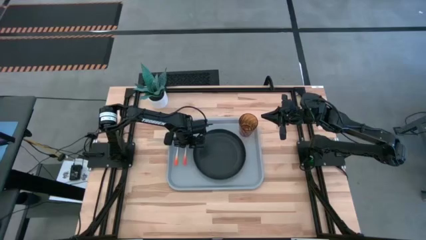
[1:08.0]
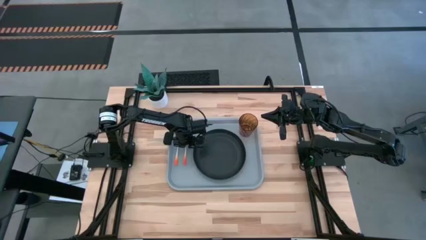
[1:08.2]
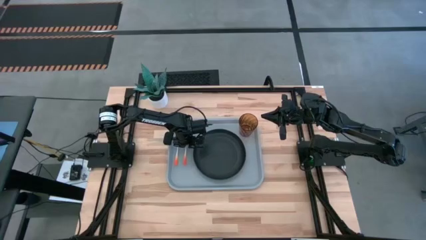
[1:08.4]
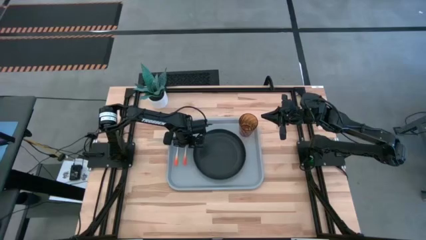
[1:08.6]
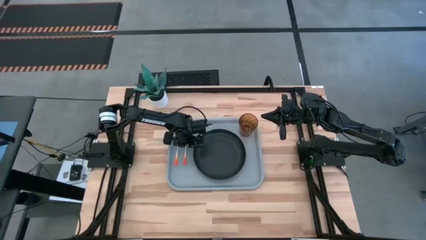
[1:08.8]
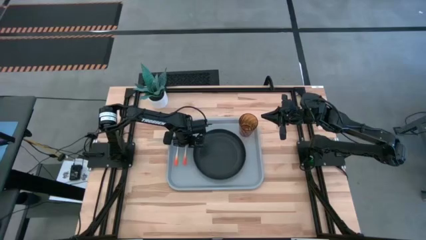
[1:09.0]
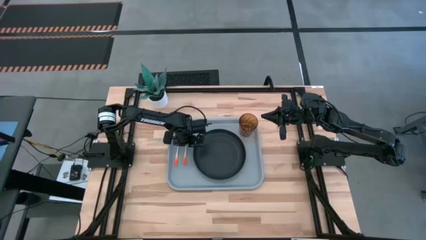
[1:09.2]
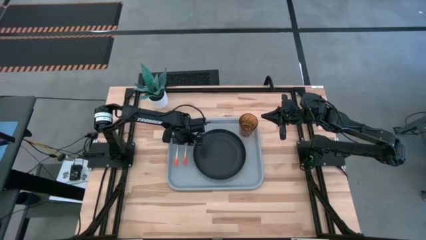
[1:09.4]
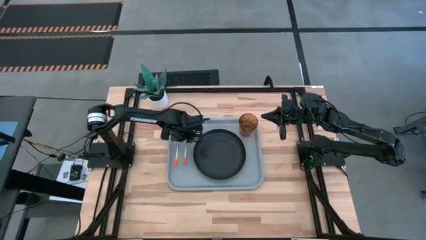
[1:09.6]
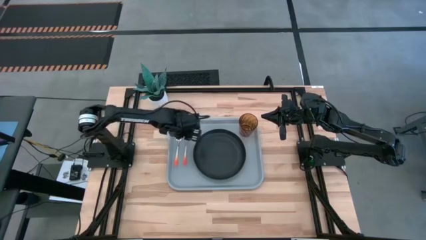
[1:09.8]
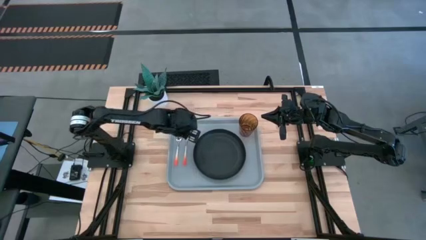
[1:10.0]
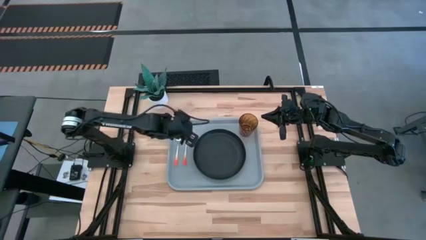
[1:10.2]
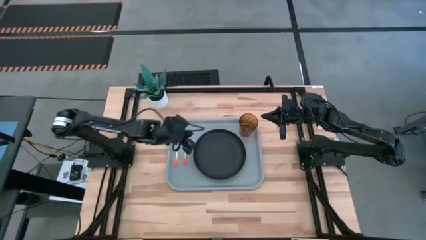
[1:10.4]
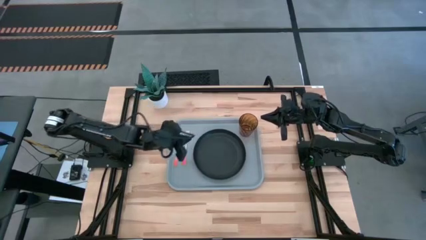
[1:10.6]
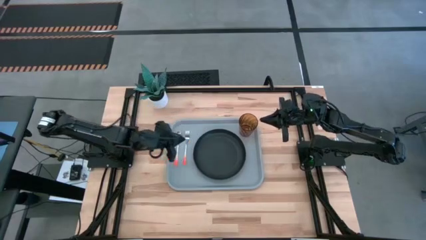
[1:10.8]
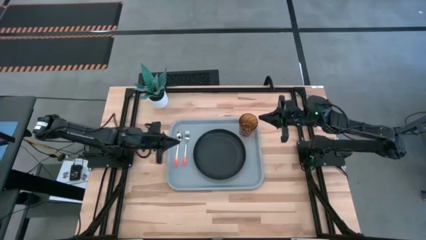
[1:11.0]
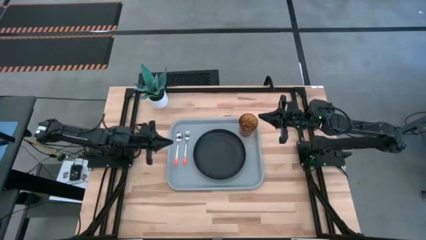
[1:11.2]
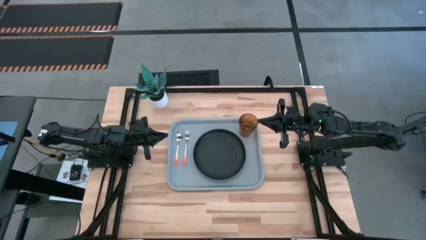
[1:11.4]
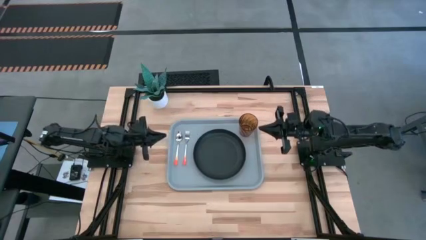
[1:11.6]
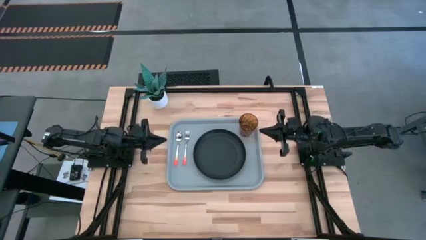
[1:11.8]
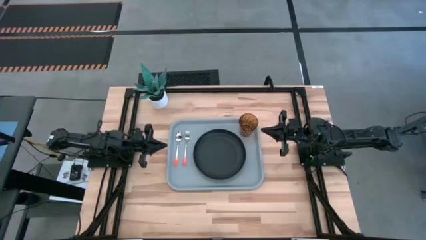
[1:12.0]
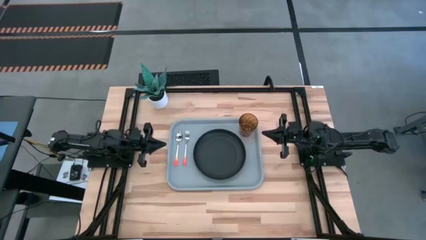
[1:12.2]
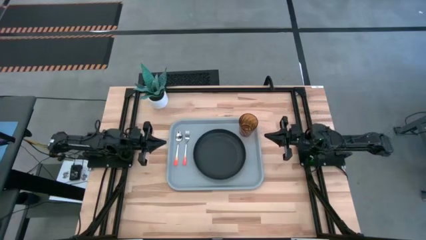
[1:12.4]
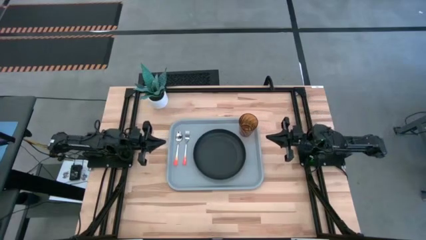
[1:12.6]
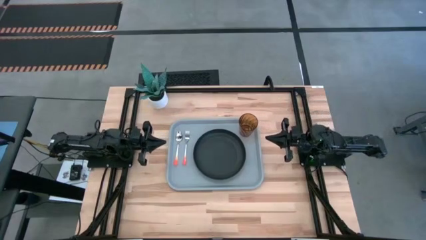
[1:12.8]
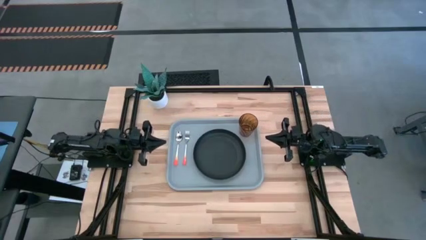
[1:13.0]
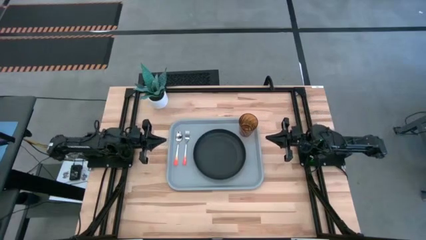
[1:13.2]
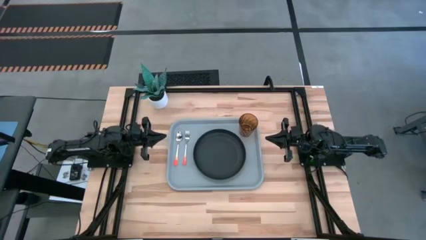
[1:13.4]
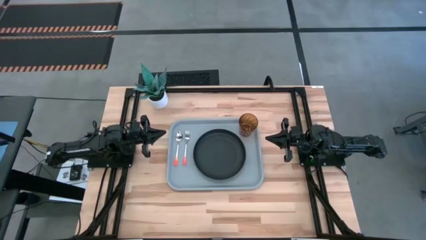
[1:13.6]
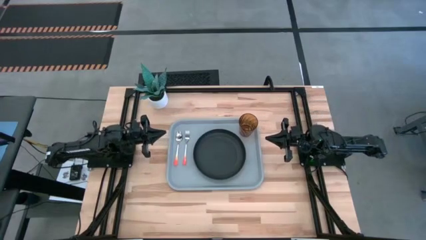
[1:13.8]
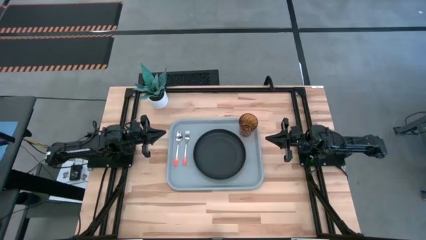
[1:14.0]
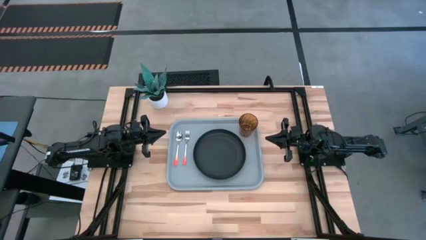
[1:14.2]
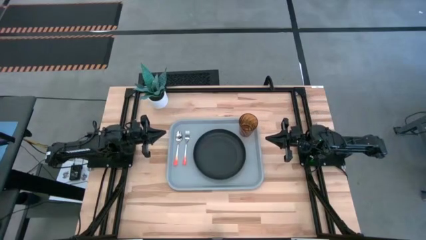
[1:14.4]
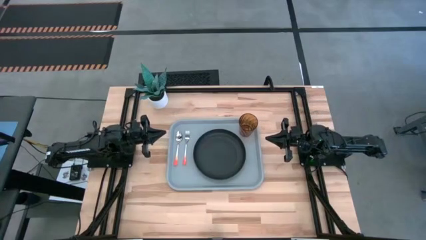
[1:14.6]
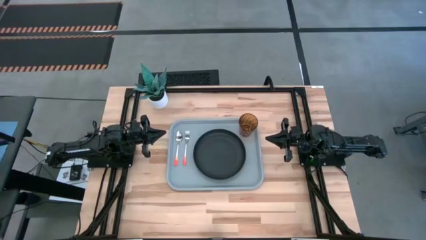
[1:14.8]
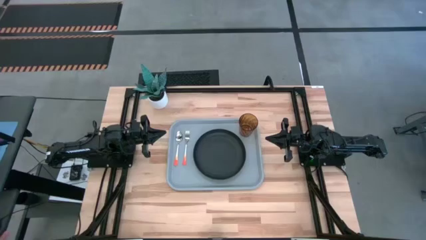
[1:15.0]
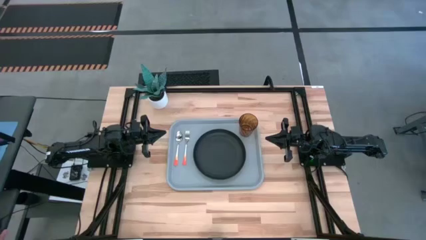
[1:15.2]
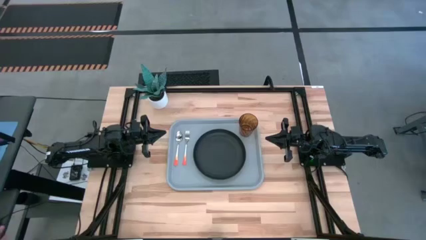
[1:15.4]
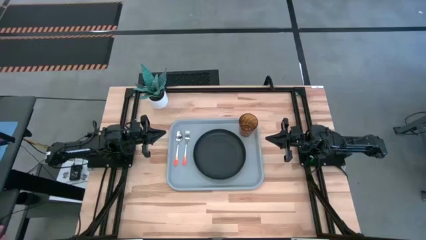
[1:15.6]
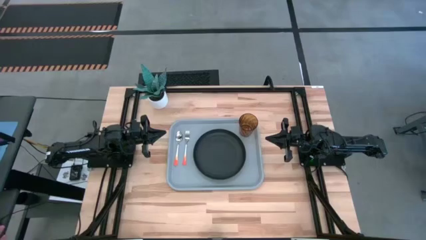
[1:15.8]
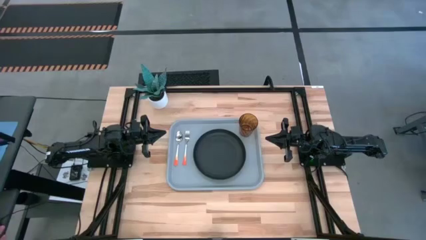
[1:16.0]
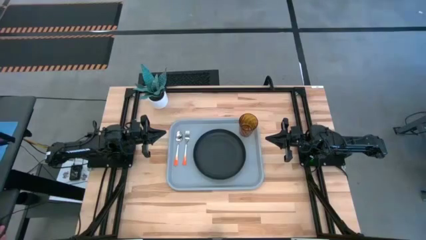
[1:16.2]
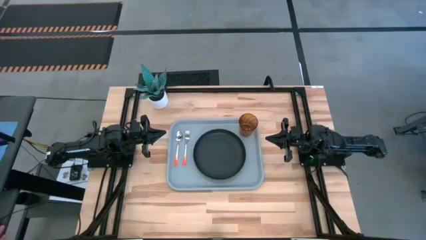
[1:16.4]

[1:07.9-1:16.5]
Task: Pick and place plate/cup/fork/spoon on tray
Return to Home Position

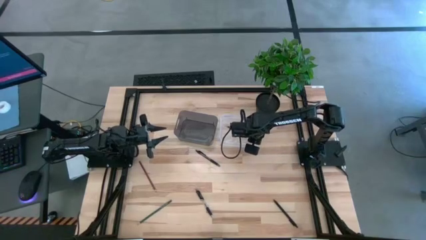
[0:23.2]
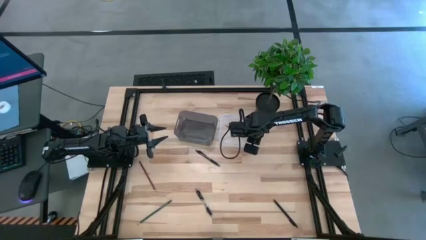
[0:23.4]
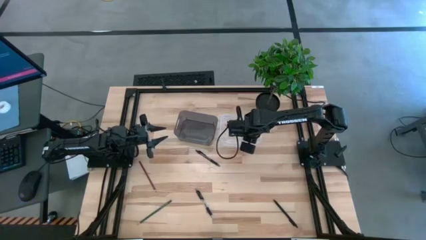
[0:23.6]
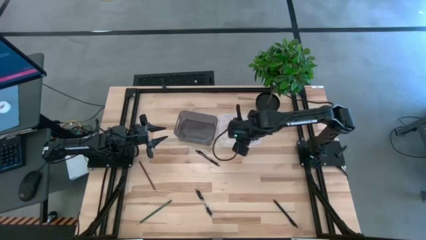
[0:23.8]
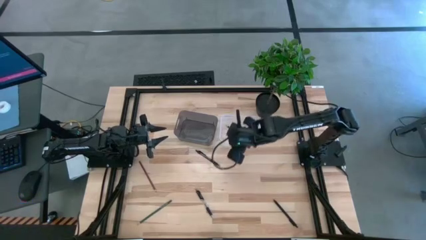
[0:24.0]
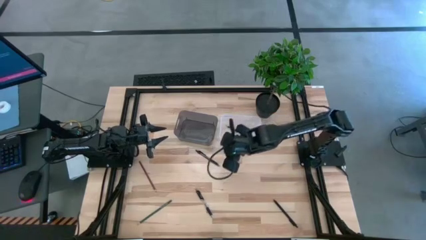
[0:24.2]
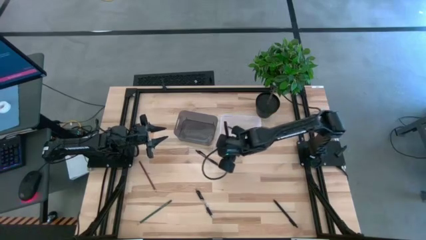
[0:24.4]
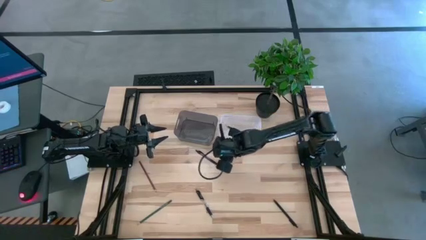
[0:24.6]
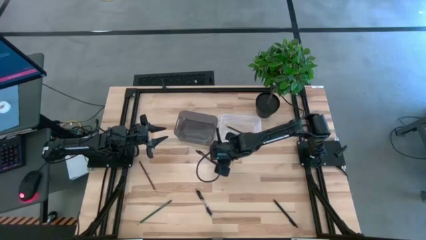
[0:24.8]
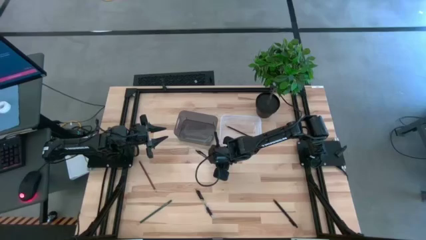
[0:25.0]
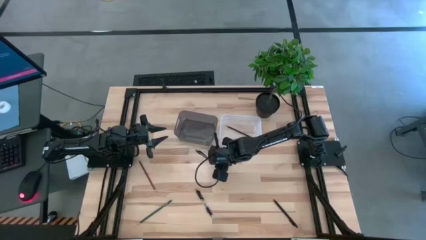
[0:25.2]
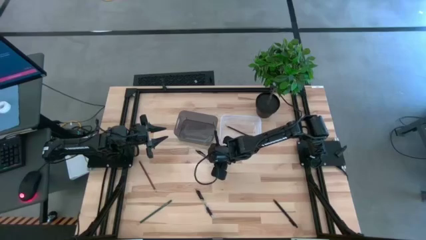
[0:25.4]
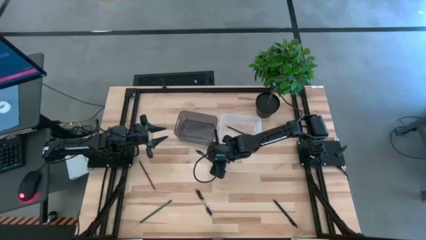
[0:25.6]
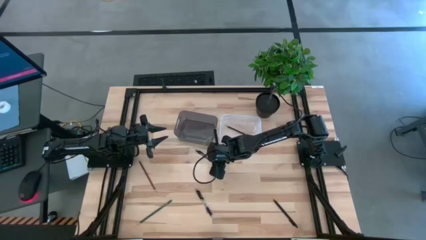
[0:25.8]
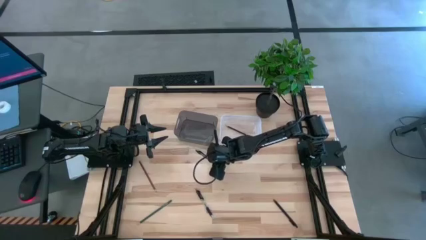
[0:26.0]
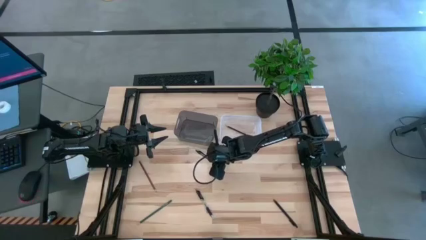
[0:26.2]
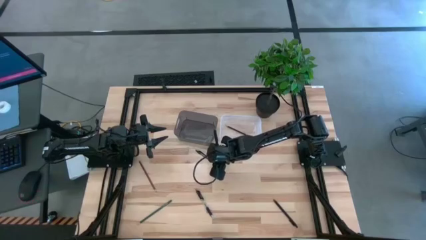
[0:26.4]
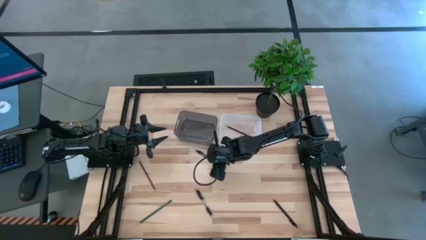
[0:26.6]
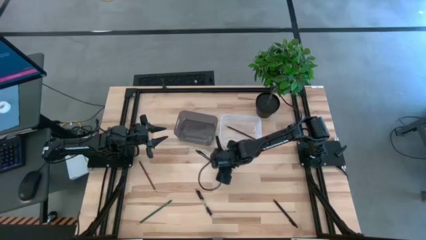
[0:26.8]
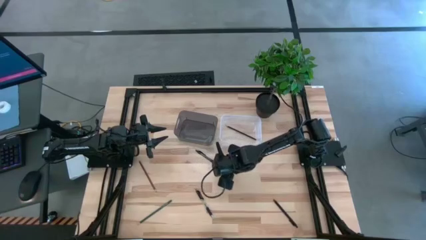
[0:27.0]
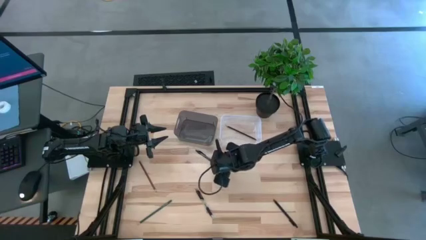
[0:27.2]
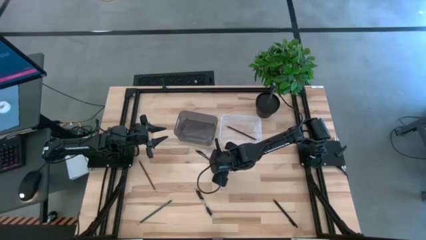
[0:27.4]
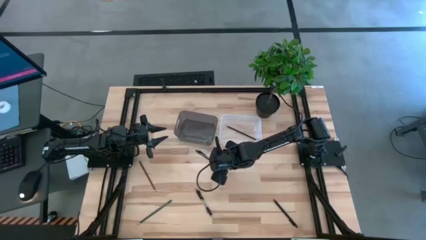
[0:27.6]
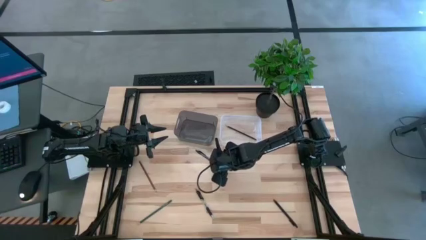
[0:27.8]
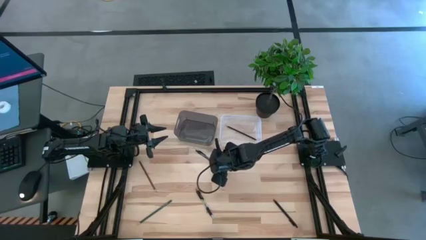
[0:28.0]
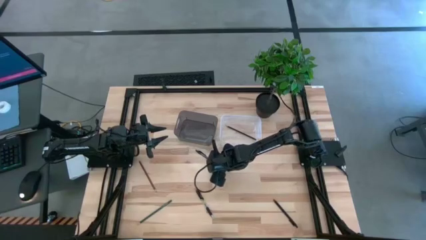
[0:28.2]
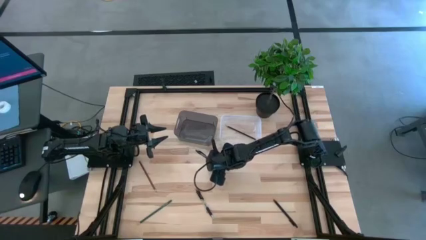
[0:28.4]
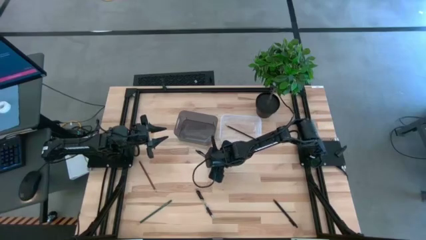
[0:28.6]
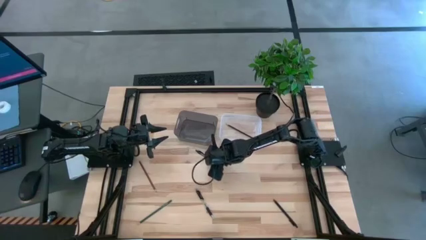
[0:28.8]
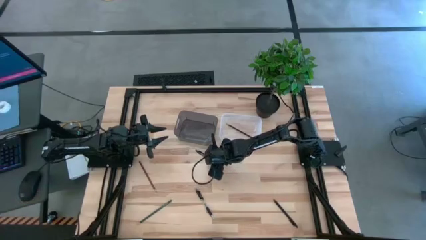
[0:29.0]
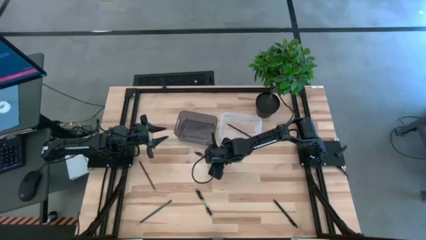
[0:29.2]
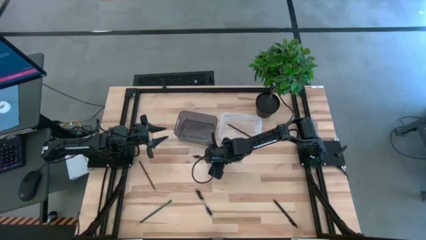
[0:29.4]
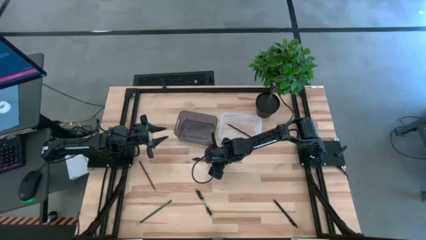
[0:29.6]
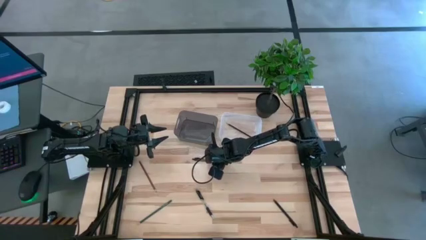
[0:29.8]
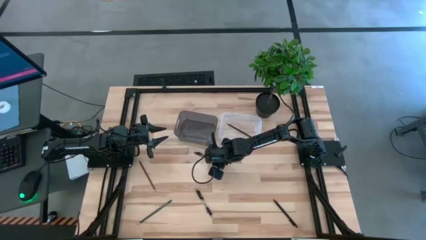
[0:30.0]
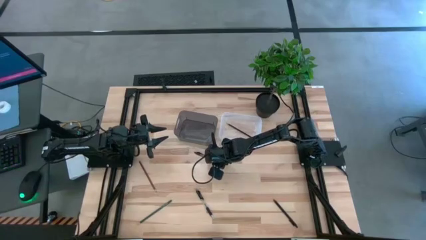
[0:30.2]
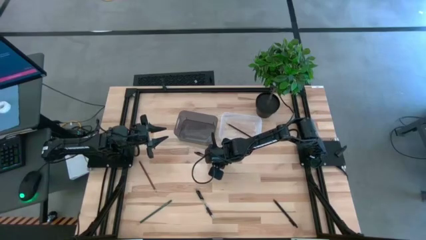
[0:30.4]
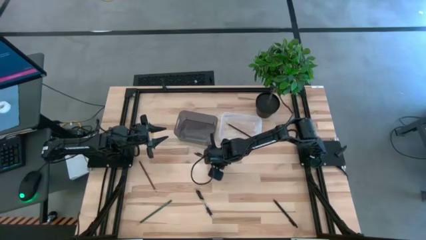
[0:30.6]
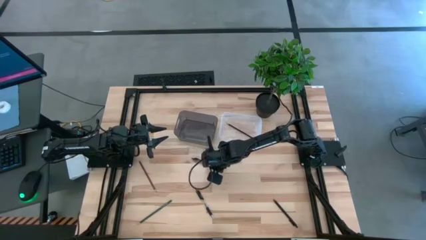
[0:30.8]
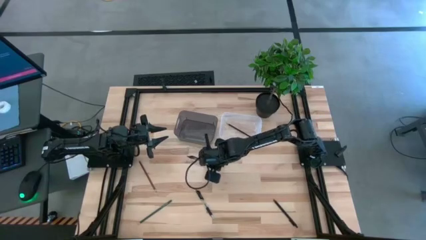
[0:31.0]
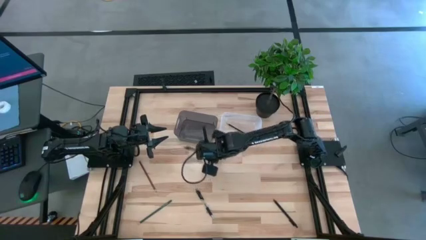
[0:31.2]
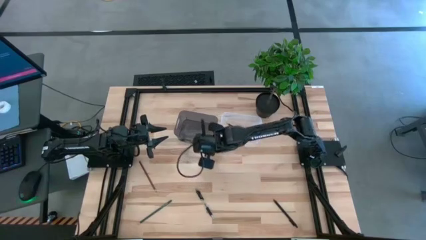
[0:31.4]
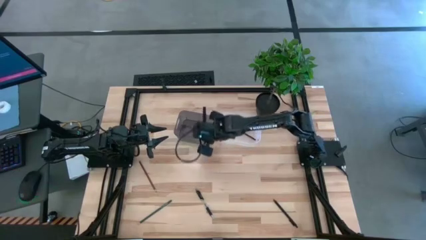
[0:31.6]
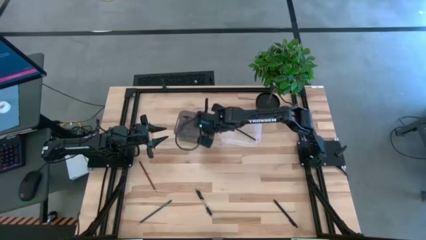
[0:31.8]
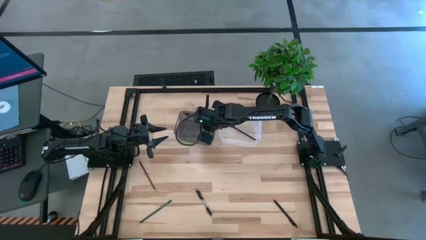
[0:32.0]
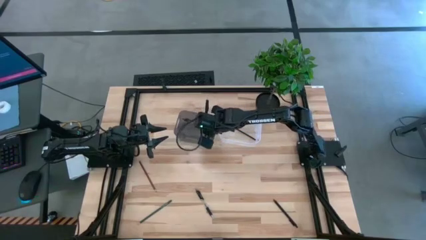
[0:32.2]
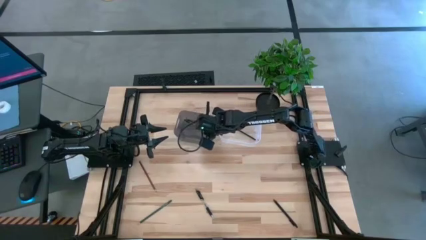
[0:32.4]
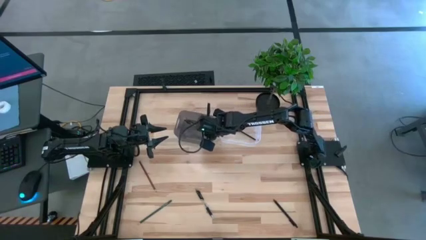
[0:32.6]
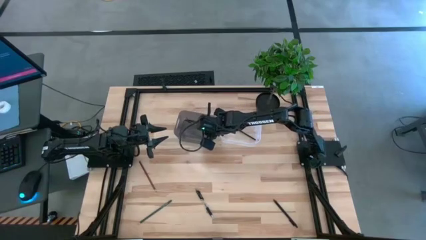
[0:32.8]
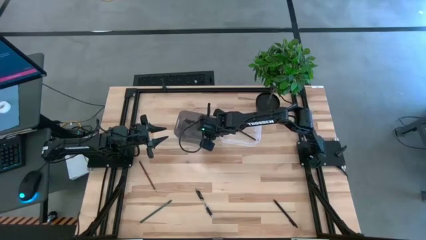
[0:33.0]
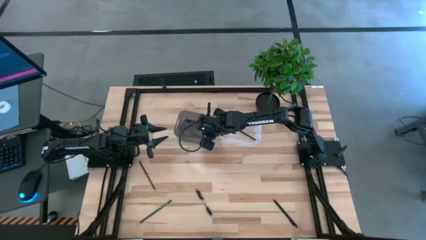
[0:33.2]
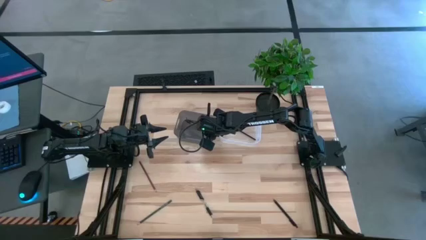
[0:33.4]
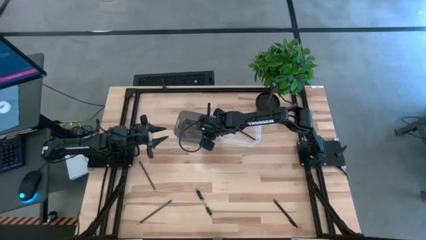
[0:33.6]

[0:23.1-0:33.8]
Task: Sort pens & pencils
Put the top black pen into the black bin
